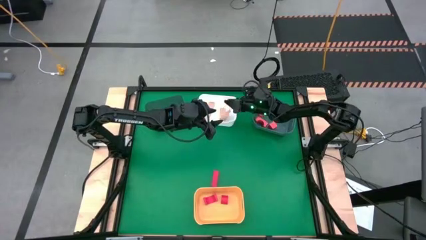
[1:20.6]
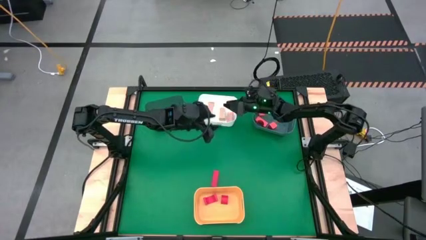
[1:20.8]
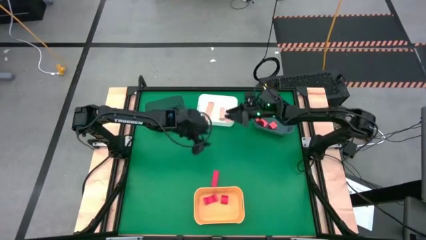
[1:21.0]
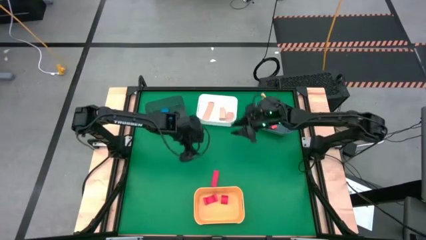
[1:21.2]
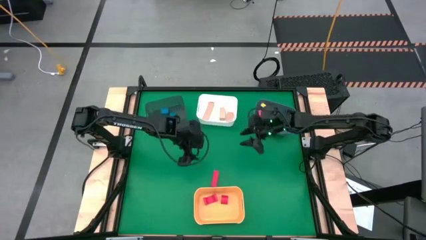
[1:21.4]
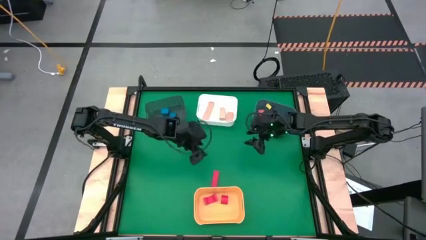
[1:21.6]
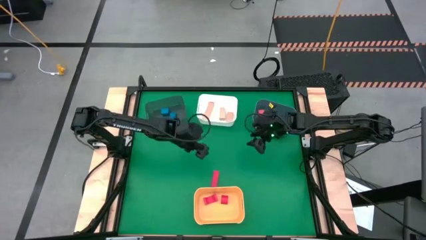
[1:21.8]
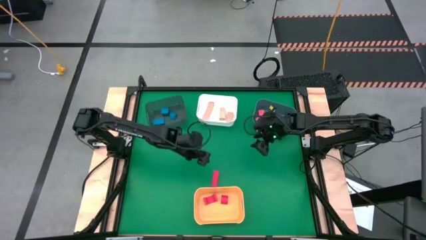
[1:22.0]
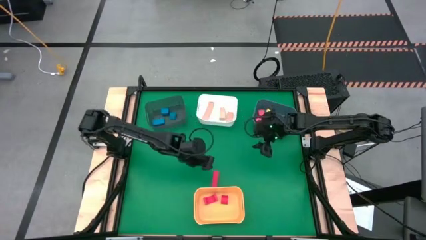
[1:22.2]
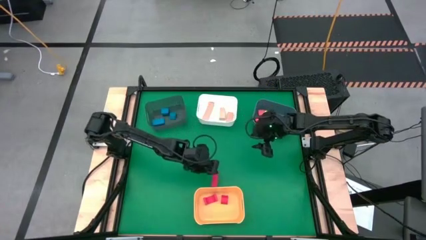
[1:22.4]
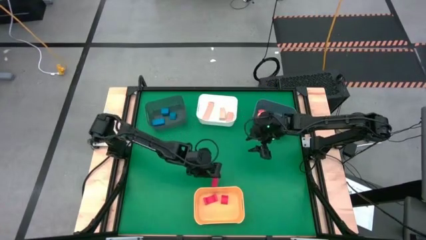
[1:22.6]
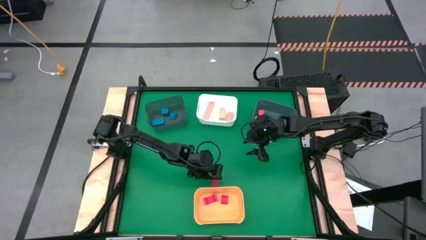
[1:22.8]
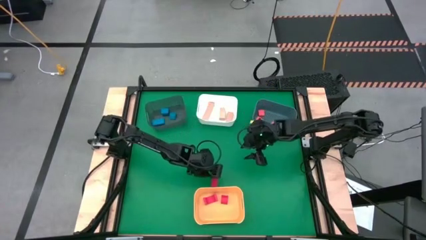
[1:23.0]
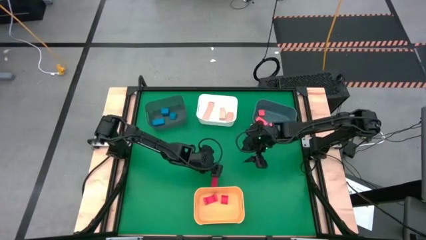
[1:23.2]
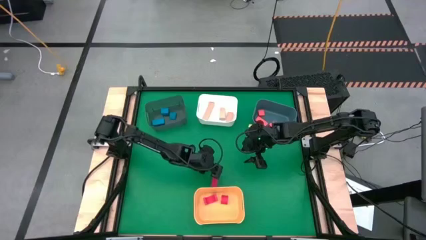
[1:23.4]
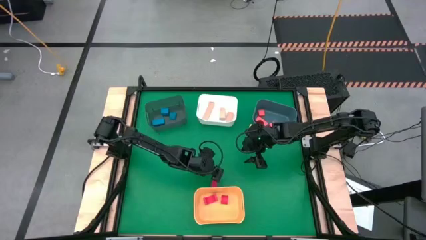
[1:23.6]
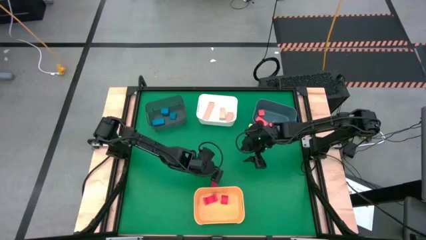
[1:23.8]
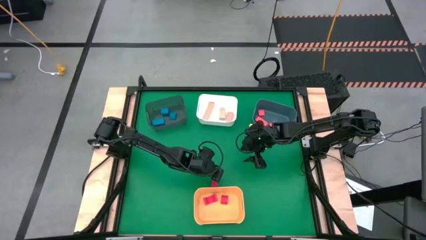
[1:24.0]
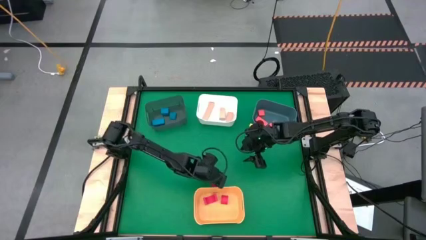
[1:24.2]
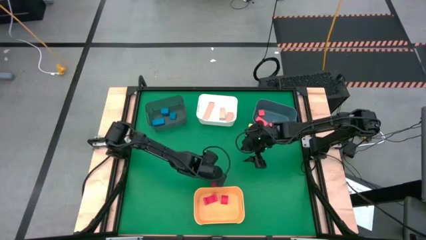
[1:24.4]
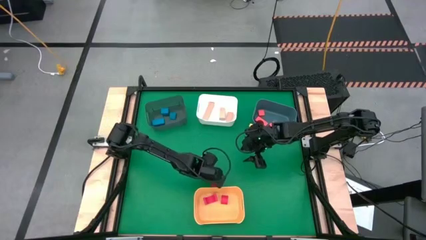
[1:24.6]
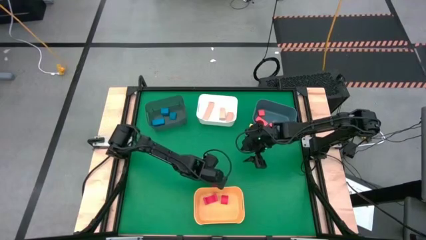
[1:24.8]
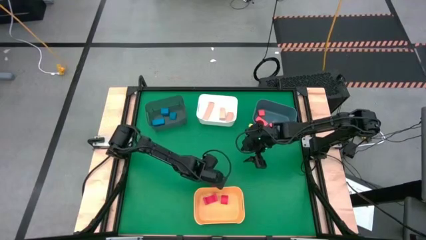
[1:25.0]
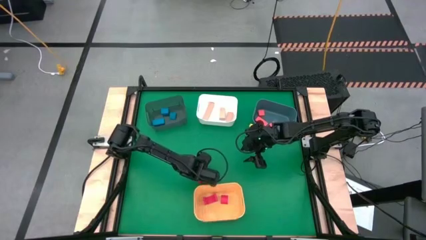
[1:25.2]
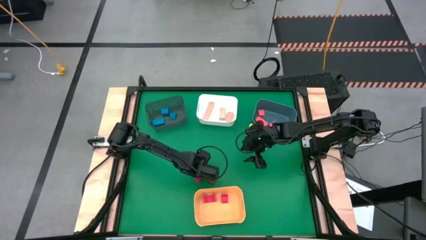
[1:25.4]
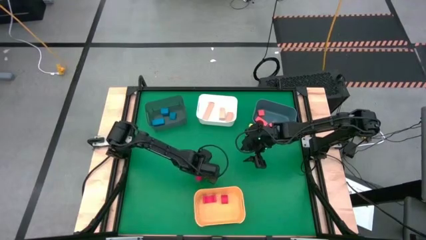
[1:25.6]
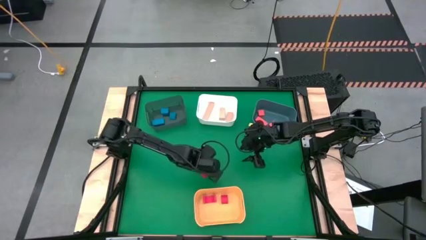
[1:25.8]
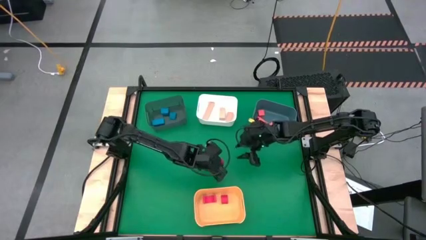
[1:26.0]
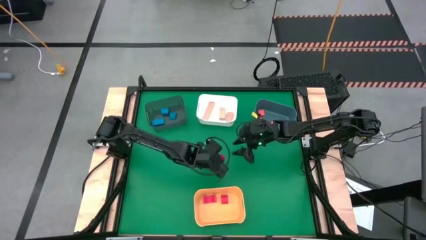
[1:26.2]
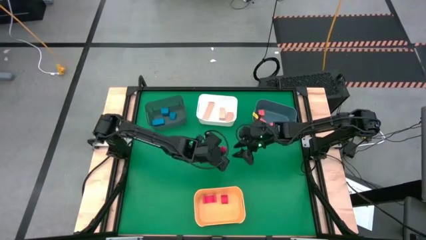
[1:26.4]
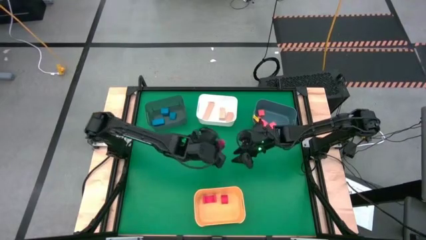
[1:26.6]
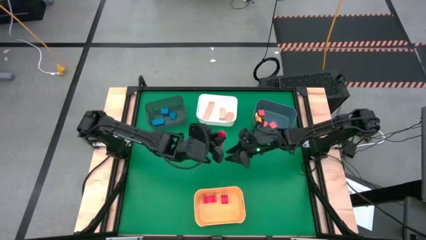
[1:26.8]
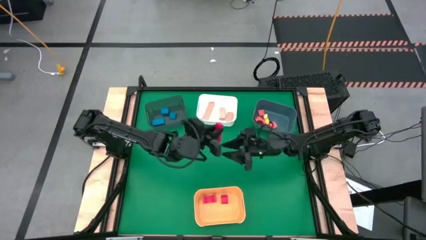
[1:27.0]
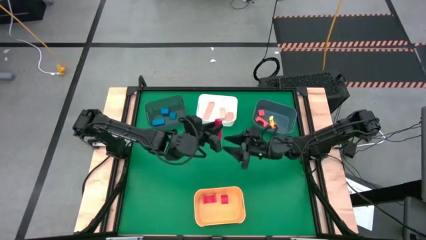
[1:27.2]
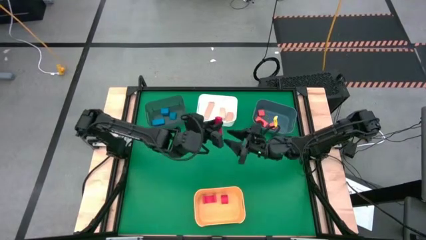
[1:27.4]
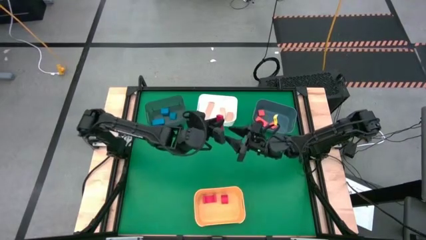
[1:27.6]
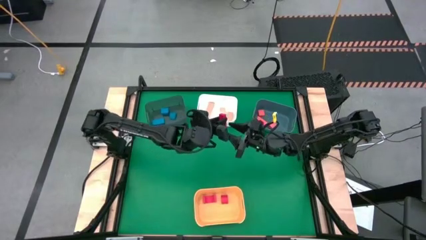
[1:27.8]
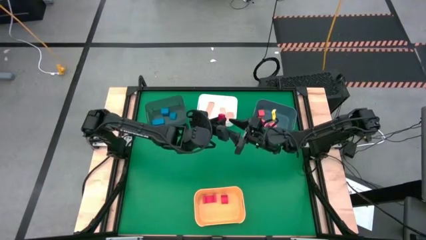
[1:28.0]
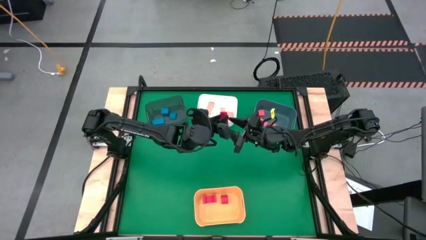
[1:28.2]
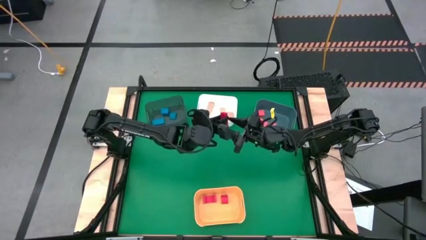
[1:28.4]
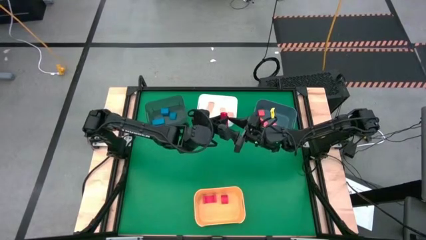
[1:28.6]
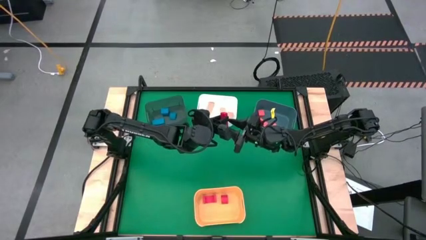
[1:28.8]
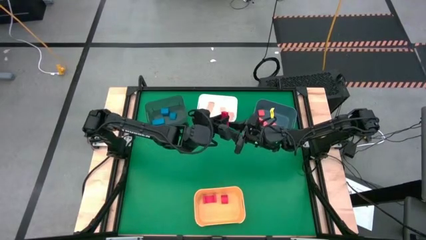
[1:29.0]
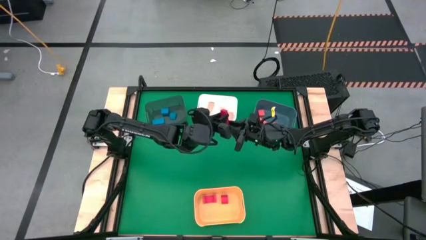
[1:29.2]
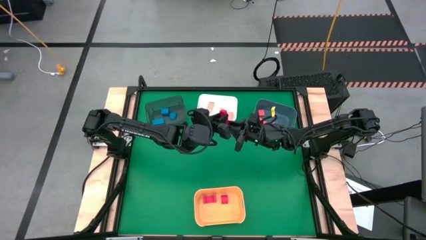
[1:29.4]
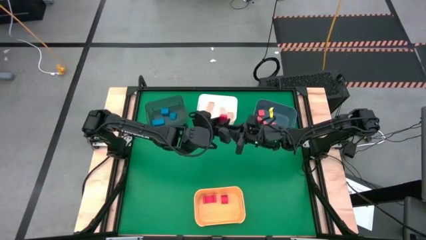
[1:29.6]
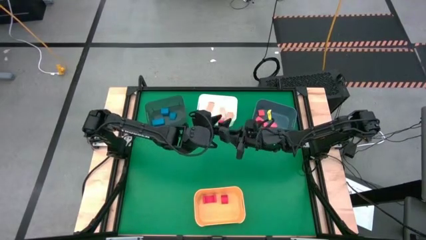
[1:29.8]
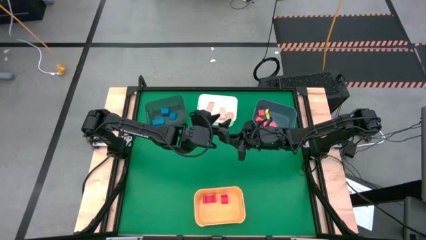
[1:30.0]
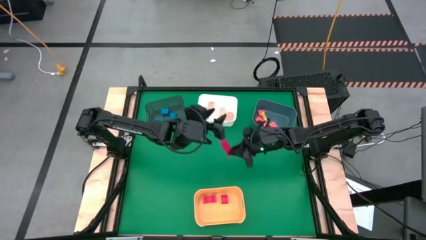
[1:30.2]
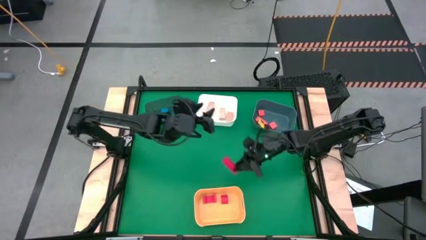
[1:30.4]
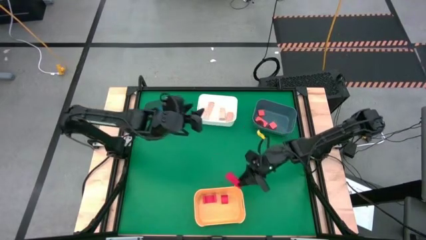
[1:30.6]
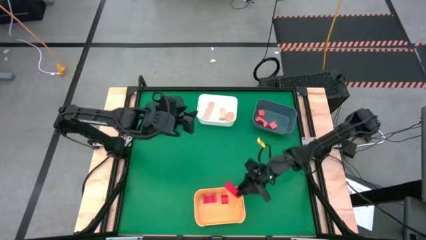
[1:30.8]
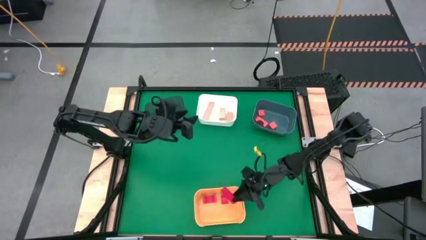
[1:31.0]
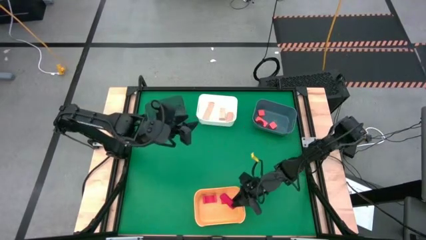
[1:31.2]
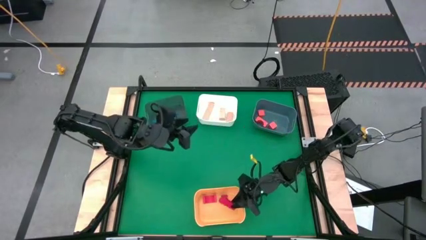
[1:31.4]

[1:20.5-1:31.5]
Task: Sort & place blocks by color
Put the red block into the yellow bin
